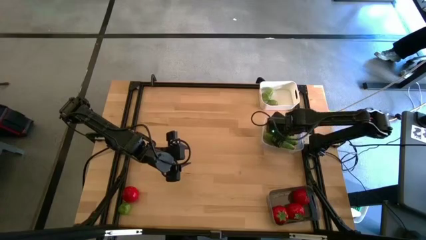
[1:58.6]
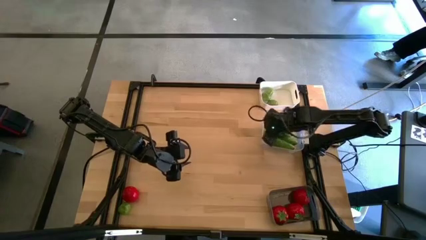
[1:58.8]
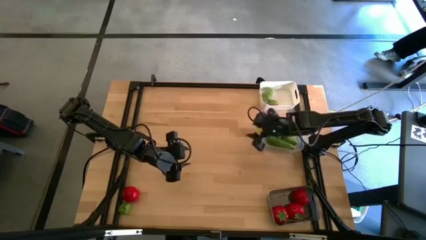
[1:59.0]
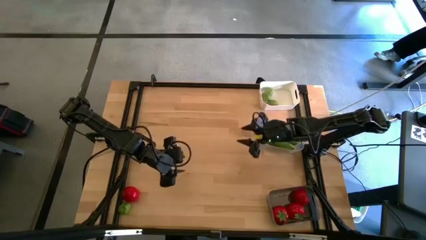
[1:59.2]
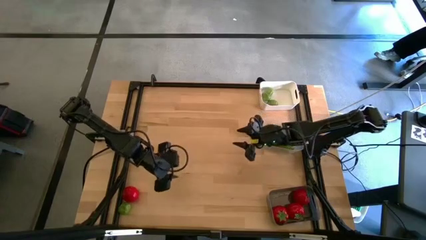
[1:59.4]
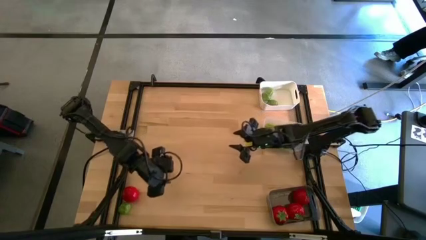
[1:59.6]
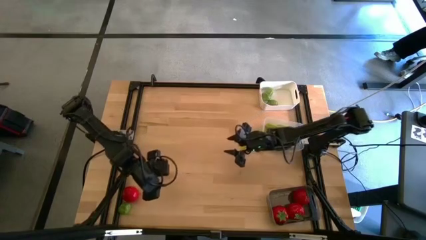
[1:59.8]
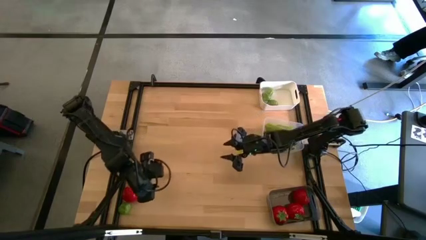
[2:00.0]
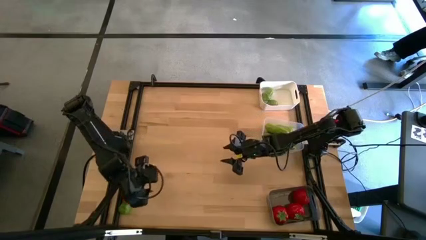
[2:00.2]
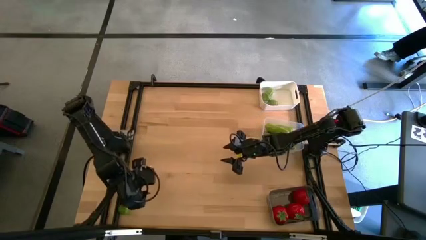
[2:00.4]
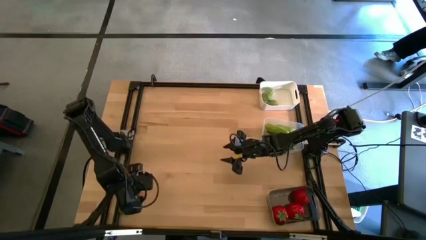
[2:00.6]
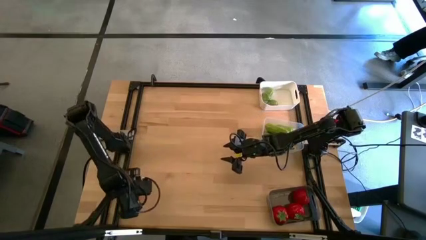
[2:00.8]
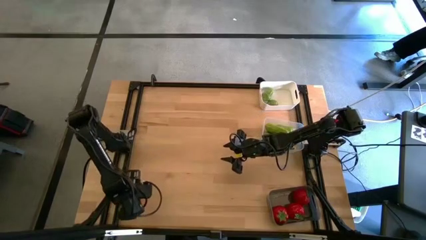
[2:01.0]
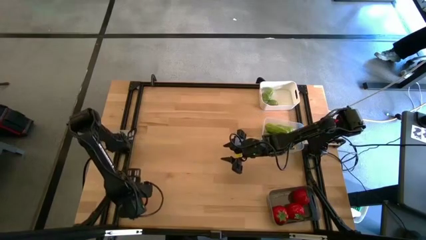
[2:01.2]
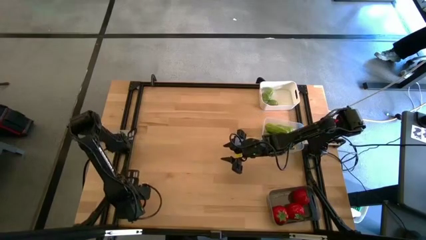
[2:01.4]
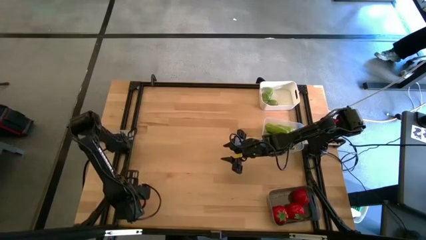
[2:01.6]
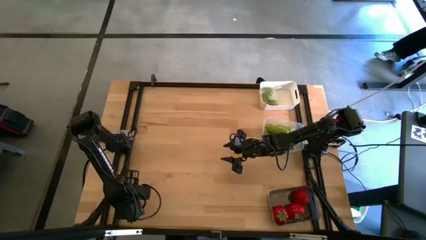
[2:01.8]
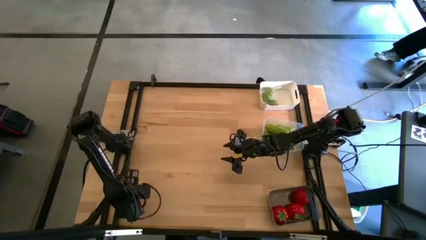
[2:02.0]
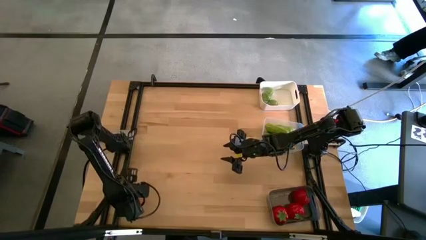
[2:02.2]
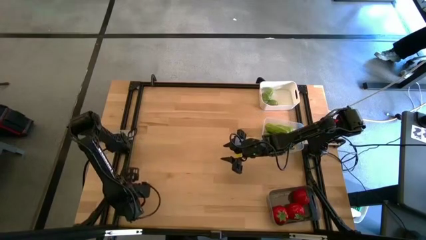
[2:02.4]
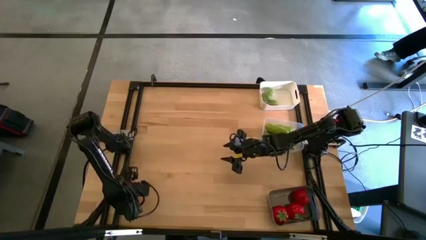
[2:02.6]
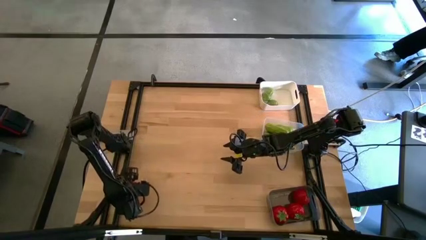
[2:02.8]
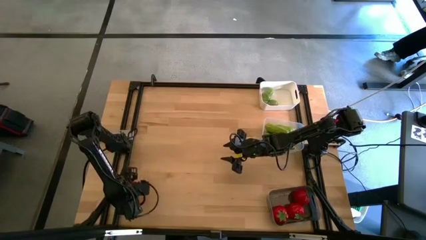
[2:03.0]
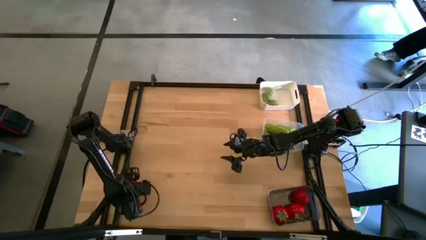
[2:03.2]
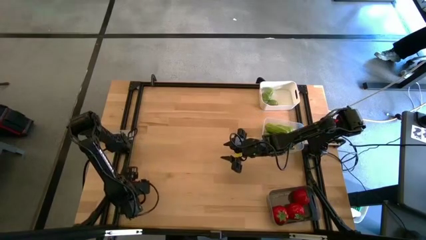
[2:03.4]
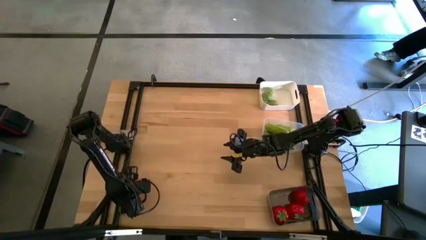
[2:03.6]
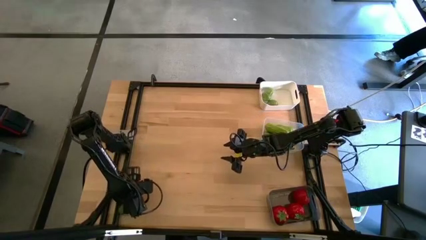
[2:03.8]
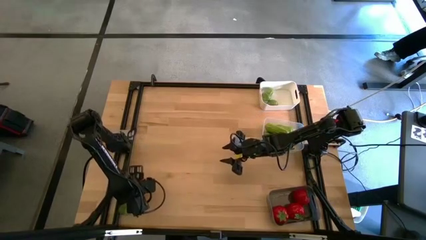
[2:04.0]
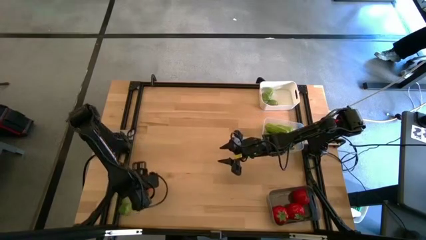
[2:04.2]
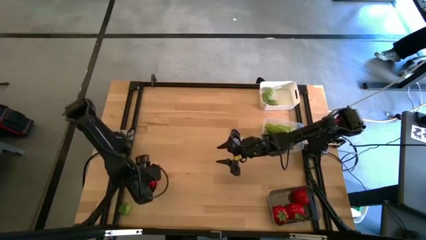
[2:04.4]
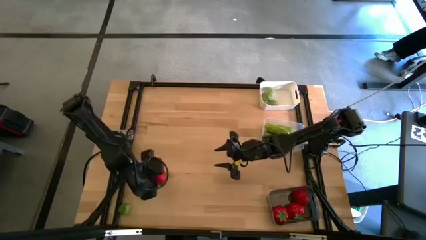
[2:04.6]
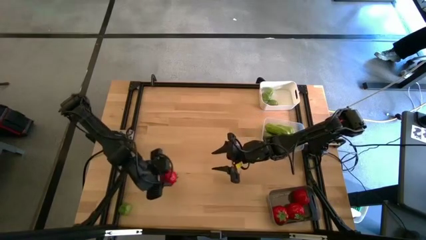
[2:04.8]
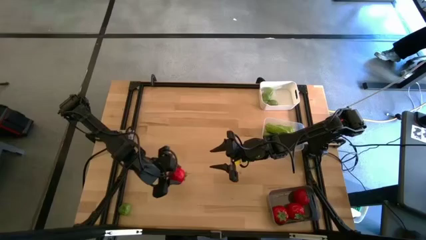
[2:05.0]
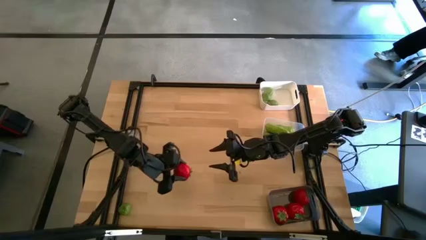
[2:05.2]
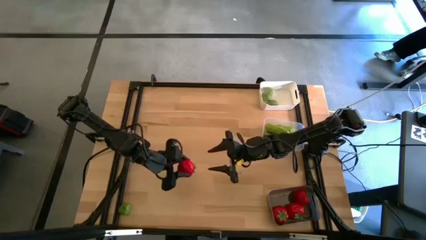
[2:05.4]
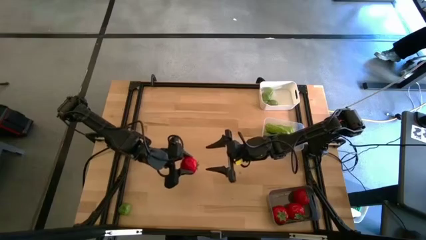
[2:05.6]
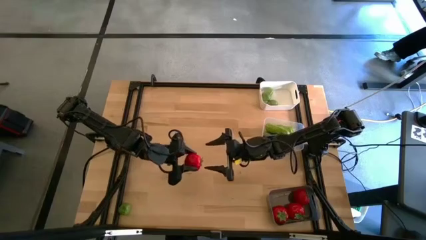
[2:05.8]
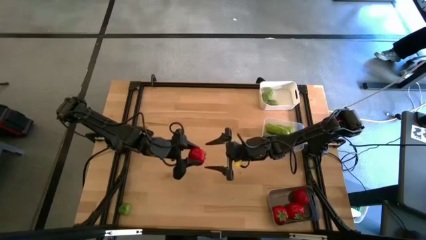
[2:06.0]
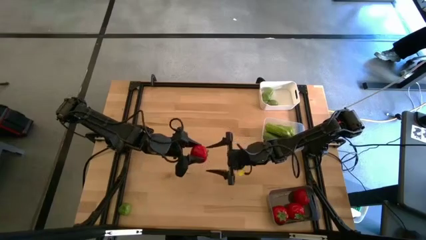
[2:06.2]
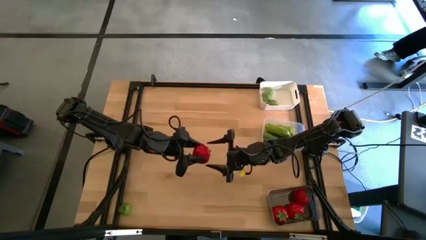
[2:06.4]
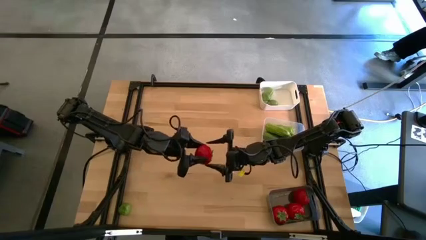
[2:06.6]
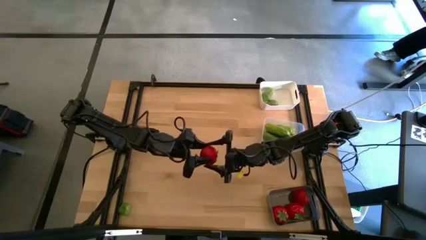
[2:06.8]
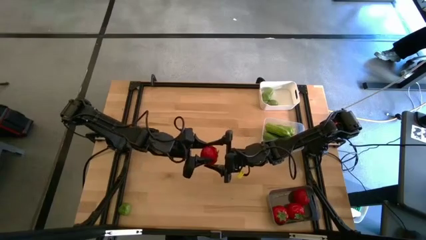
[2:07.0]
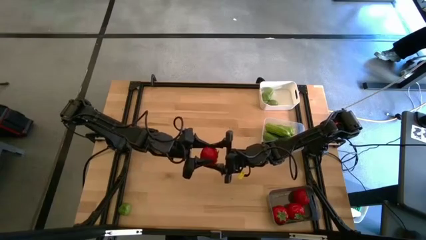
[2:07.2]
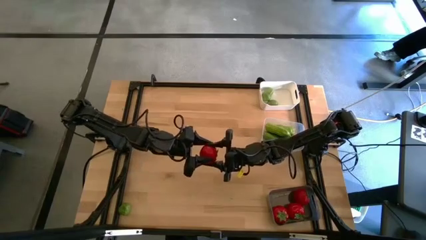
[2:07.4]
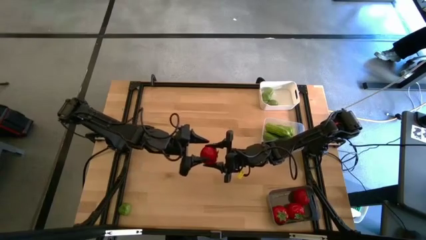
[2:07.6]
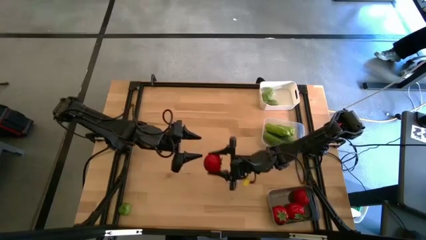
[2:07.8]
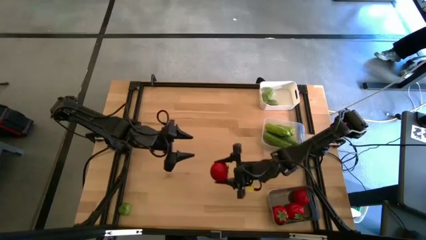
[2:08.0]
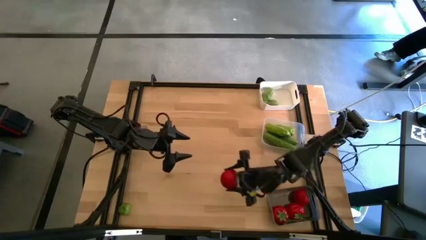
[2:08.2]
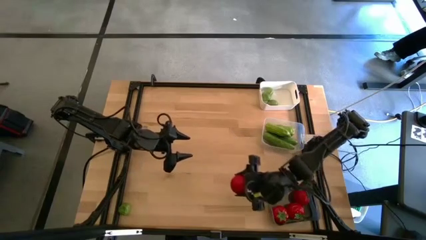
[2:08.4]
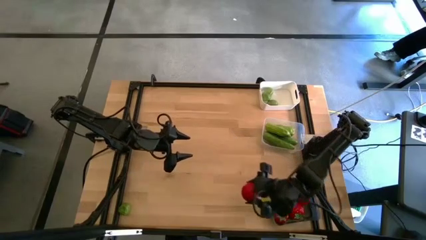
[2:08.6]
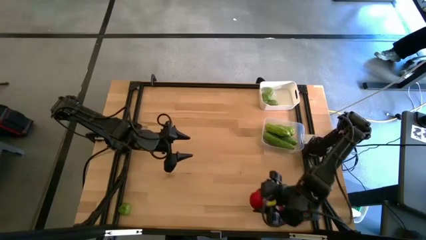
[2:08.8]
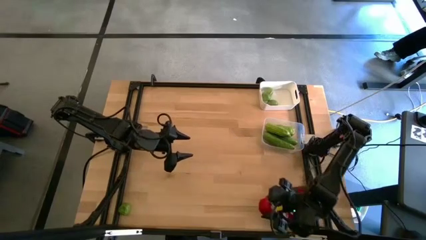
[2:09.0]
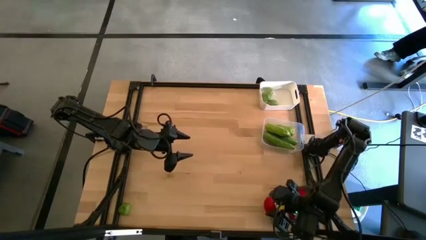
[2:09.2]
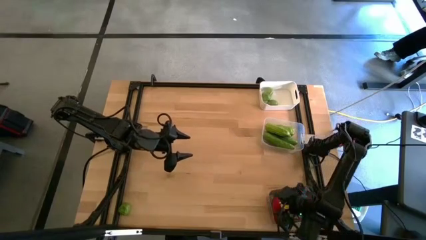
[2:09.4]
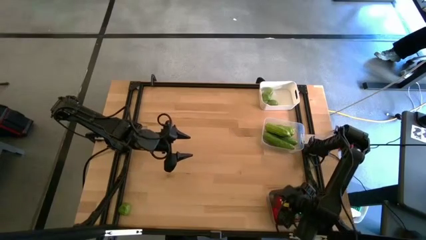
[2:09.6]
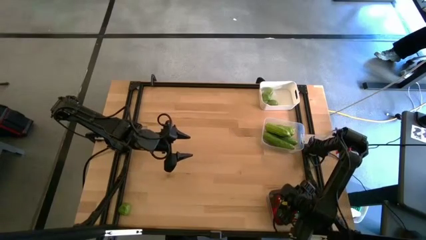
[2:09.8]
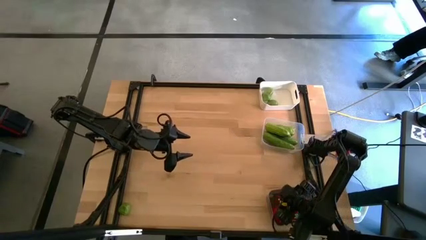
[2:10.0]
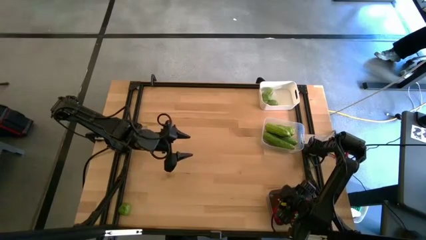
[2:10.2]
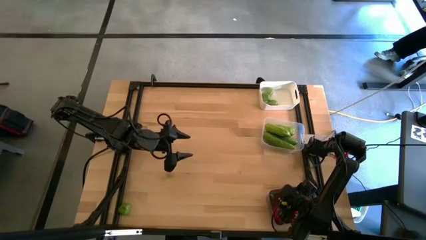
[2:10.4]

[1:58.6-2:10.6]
Task: Sort produce into baskets
Put the tomato into the black bin
